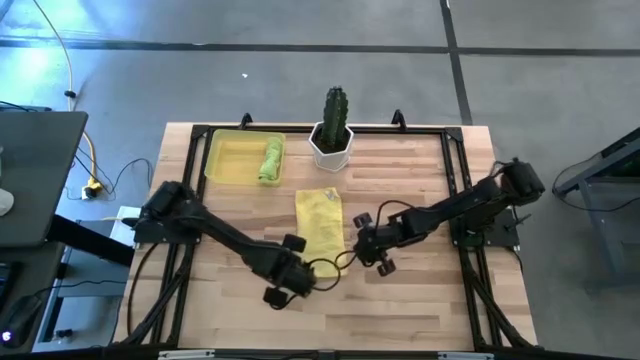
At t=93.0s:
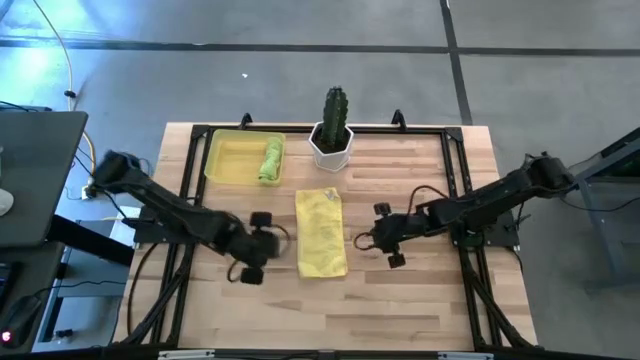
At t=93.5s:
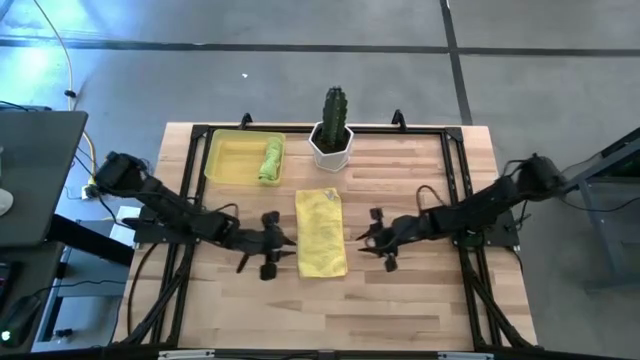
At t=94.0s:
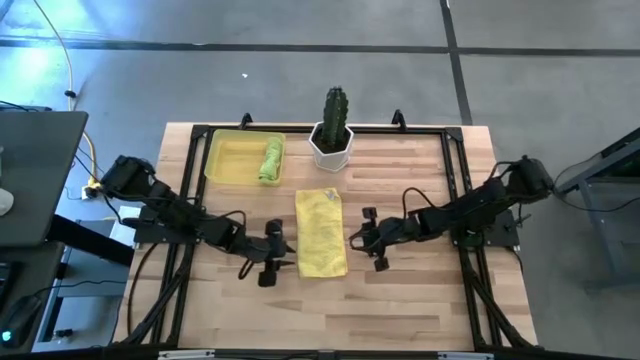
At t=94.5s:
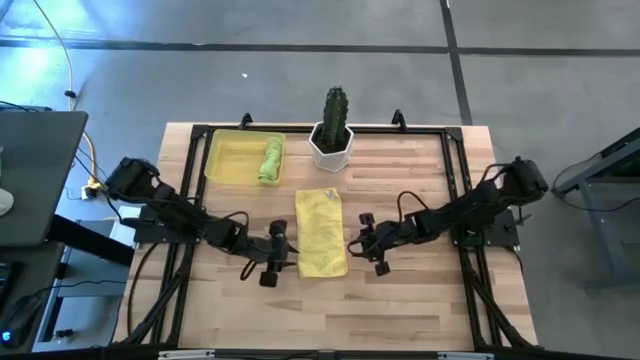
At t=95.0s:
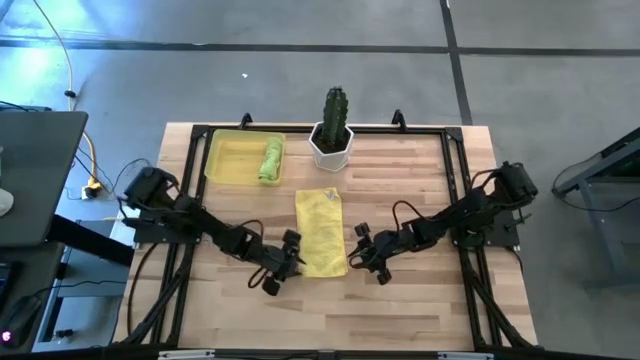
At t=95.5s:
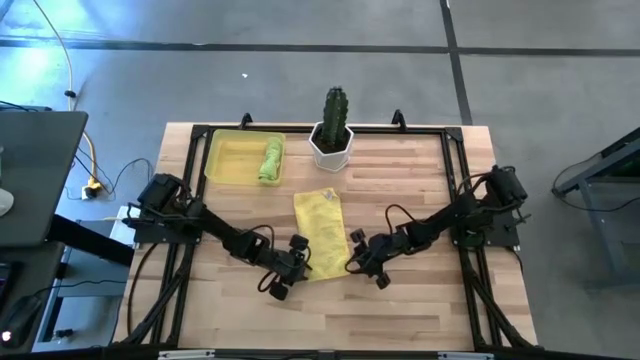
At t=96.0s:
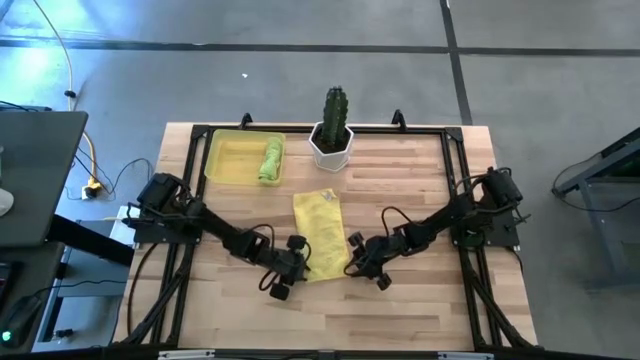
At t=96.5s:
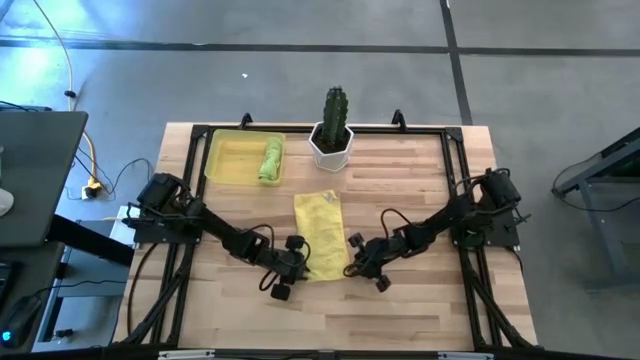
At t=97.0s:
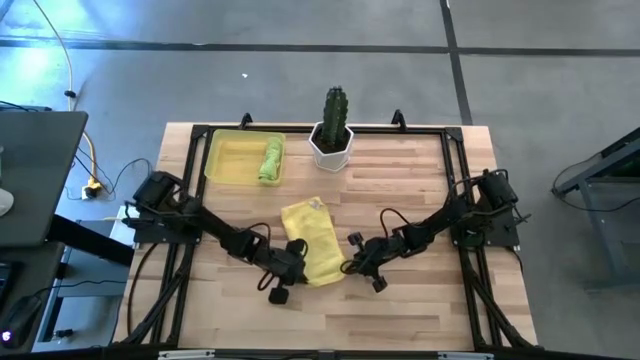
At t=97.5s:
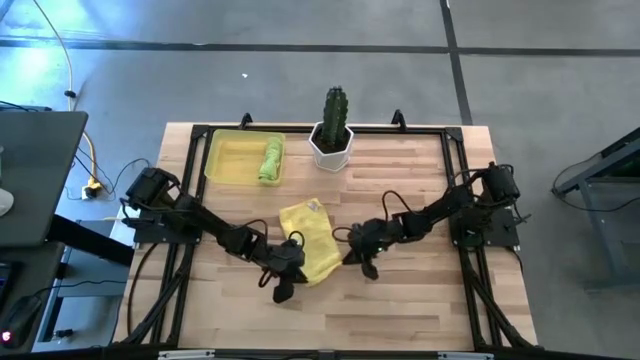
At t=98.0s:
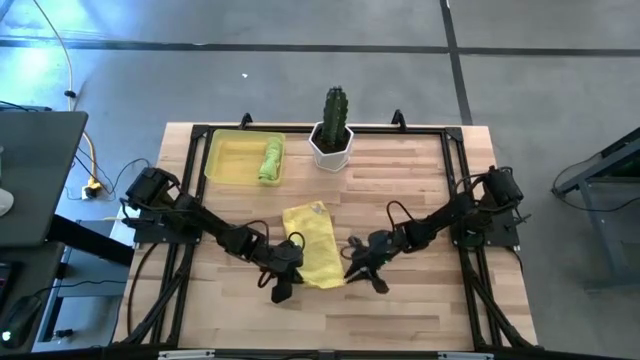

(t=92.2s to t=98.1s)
Task: Roll microfiber towels into tight, uniform cylinder then place into a basket
Roll the yellow microfiber towel

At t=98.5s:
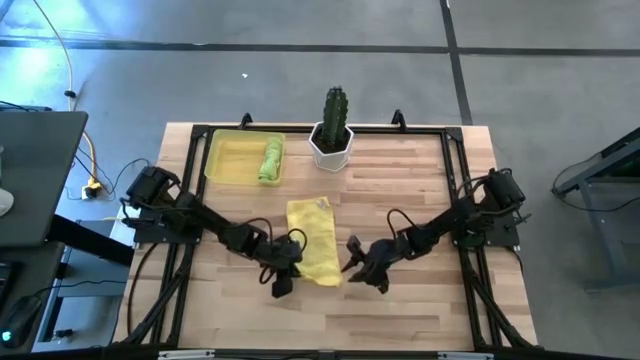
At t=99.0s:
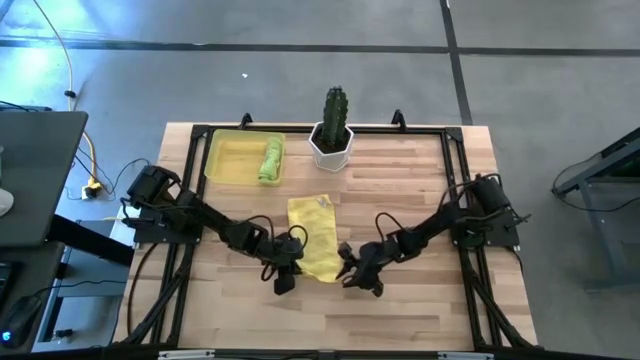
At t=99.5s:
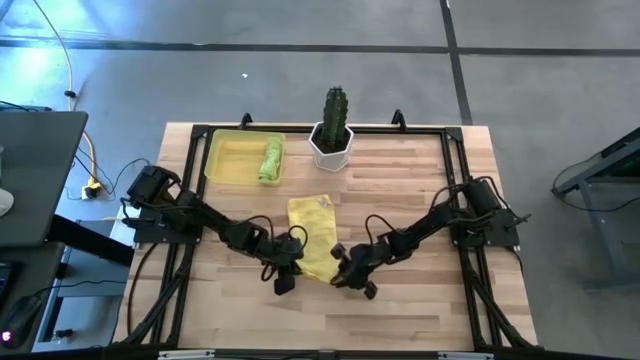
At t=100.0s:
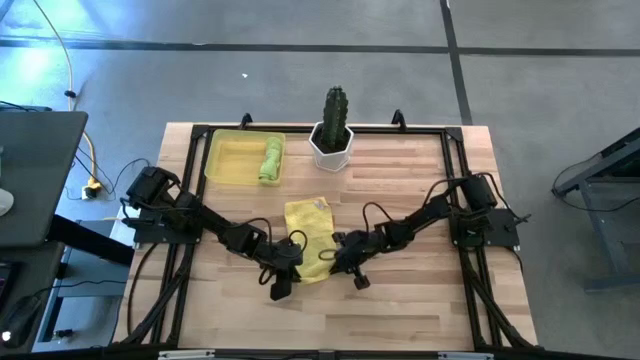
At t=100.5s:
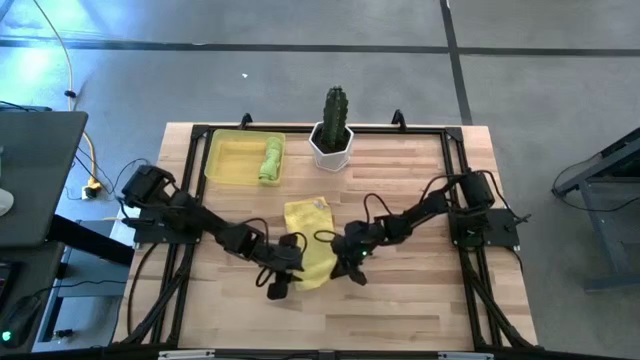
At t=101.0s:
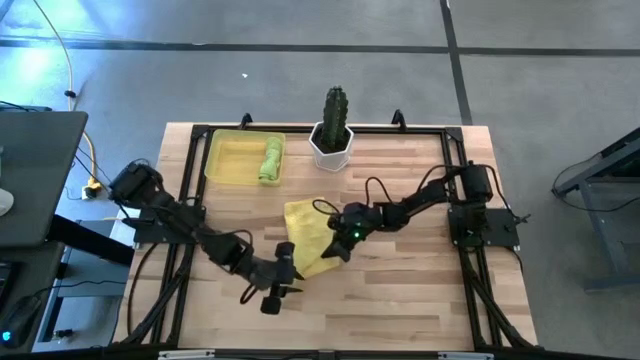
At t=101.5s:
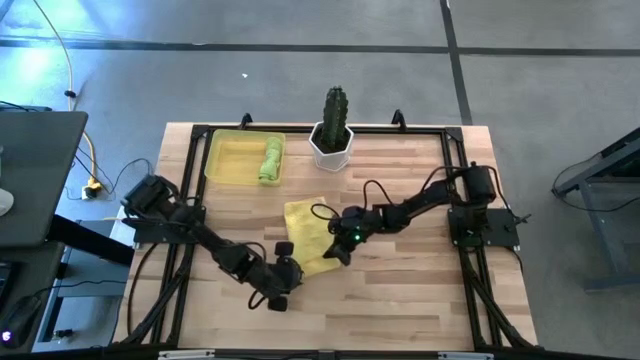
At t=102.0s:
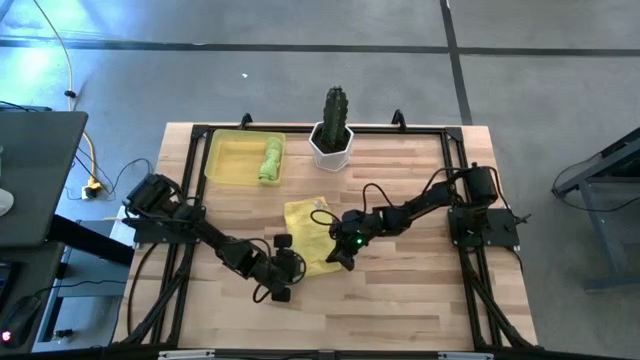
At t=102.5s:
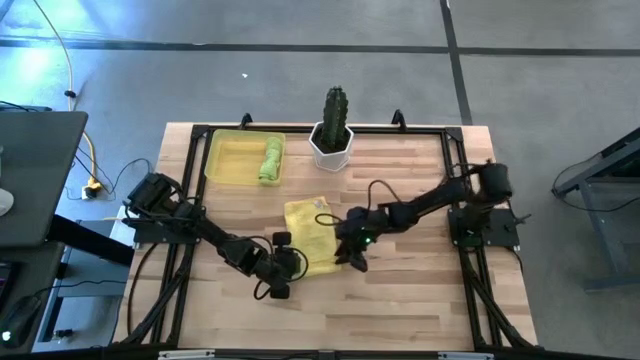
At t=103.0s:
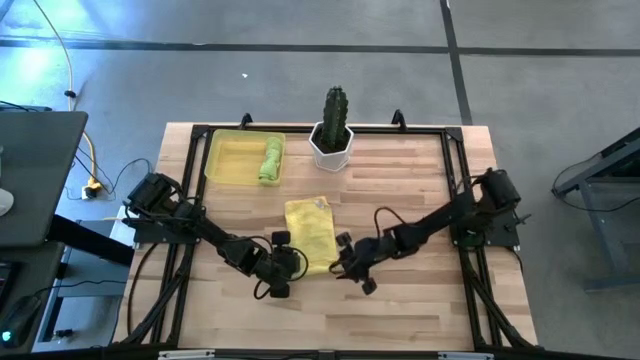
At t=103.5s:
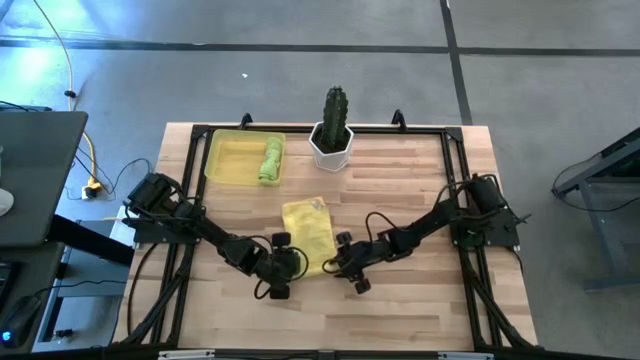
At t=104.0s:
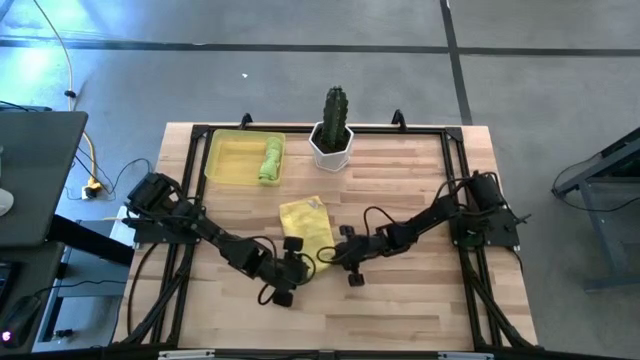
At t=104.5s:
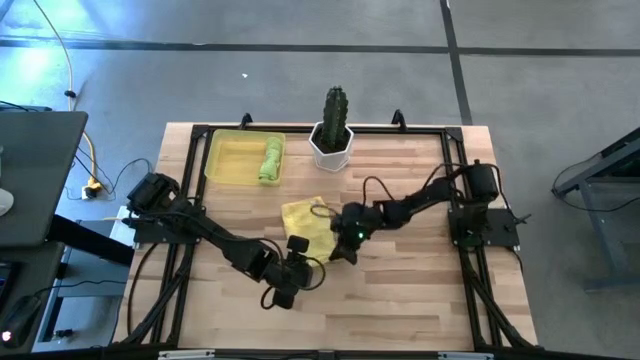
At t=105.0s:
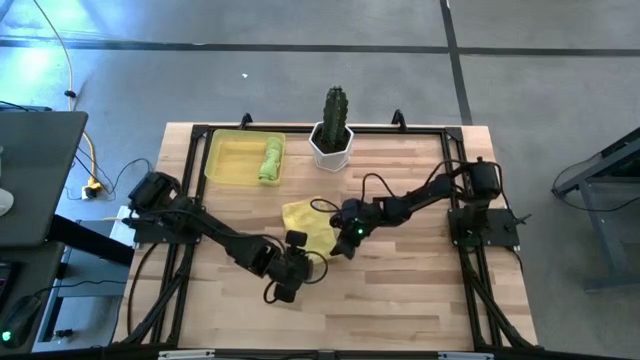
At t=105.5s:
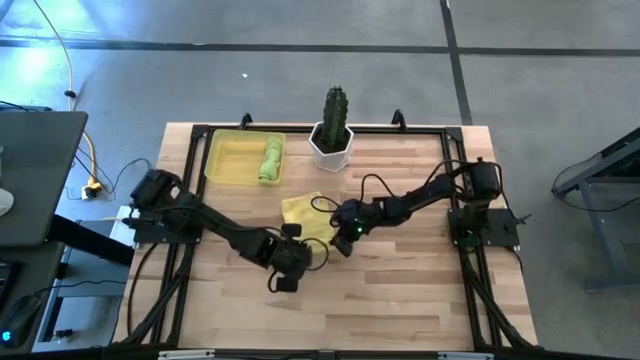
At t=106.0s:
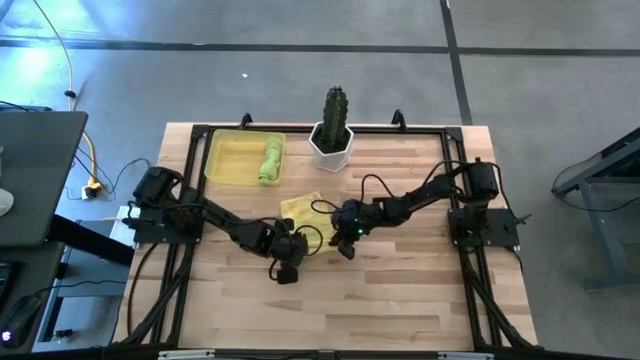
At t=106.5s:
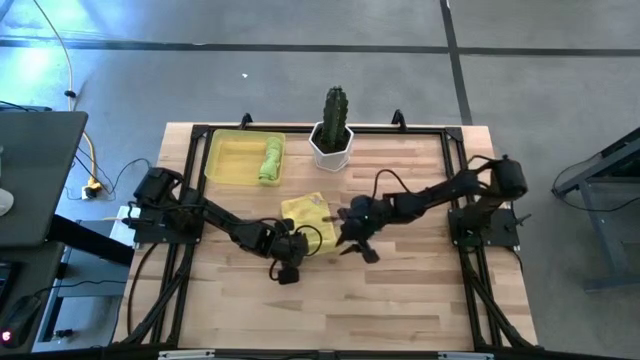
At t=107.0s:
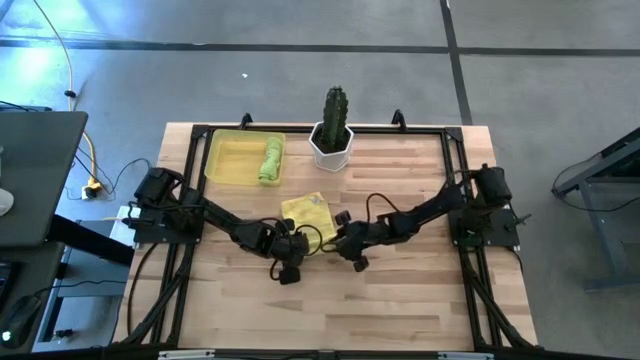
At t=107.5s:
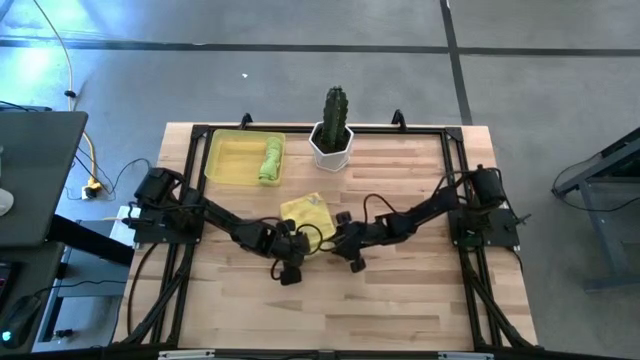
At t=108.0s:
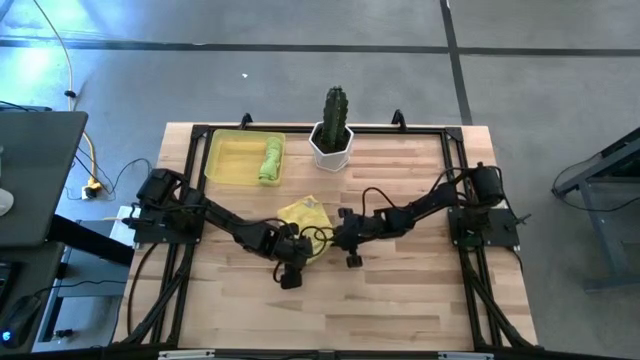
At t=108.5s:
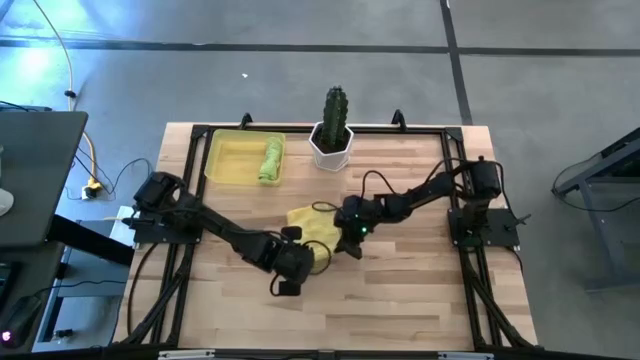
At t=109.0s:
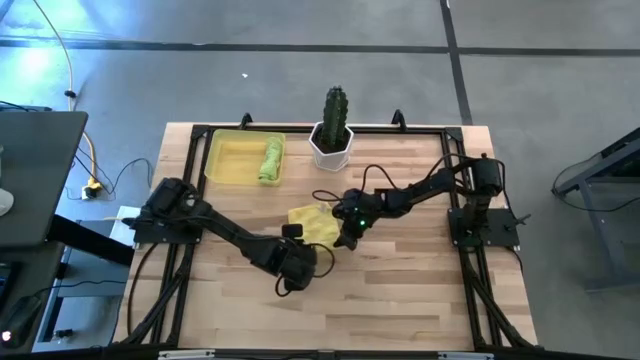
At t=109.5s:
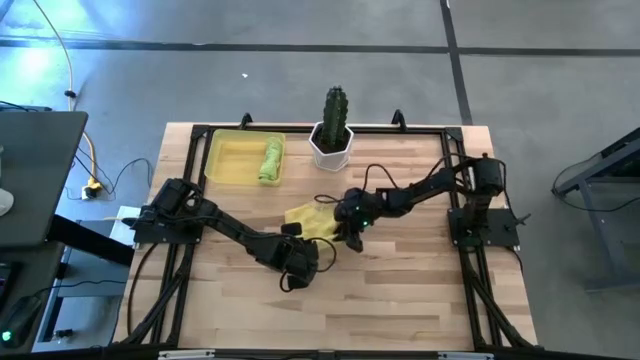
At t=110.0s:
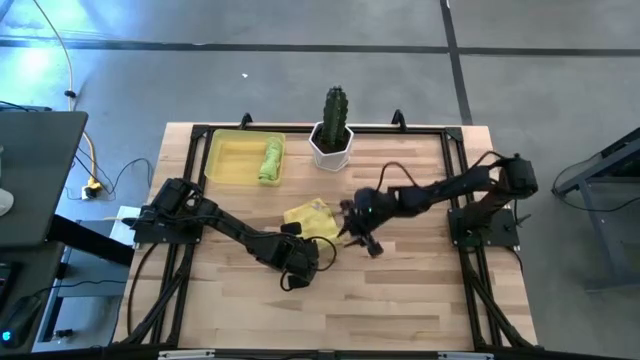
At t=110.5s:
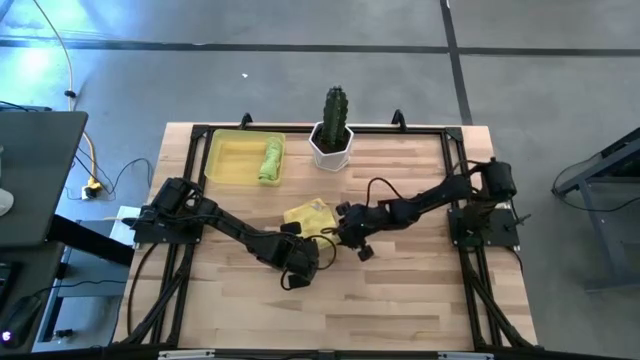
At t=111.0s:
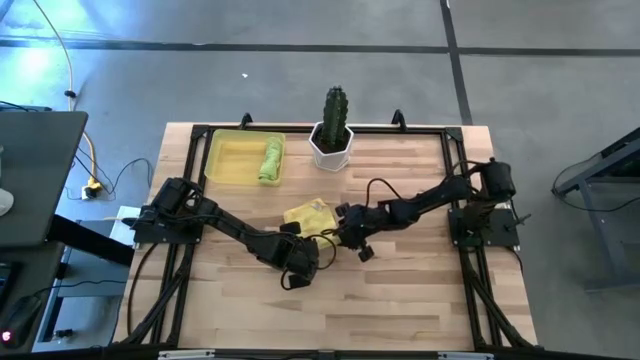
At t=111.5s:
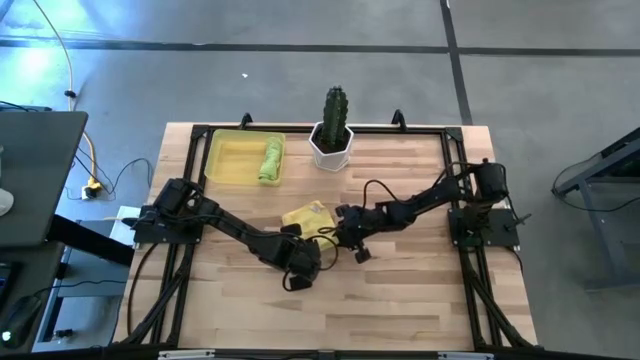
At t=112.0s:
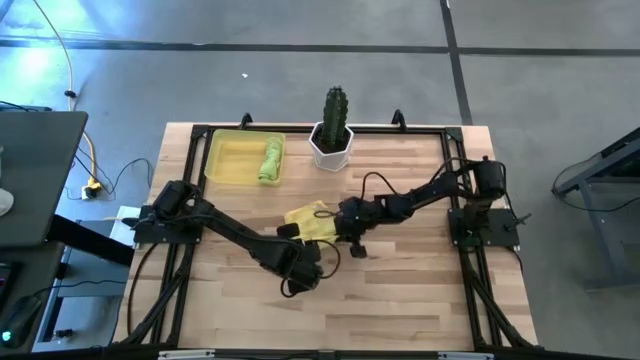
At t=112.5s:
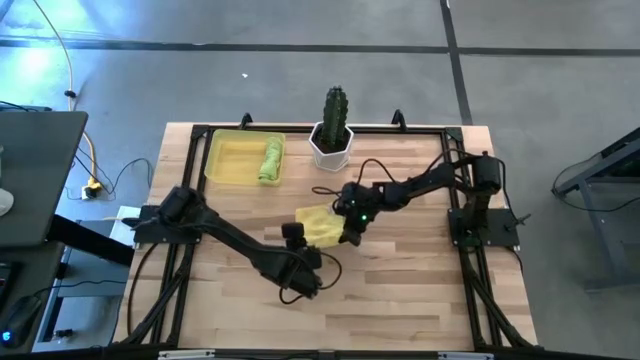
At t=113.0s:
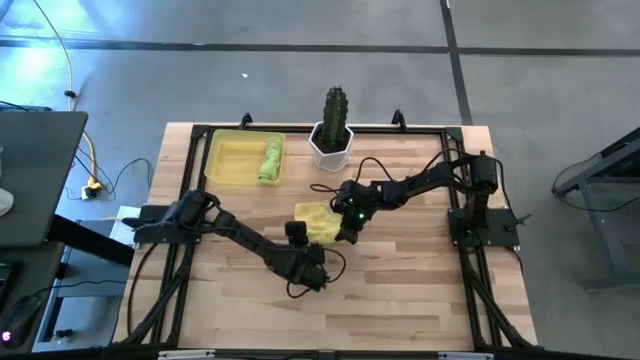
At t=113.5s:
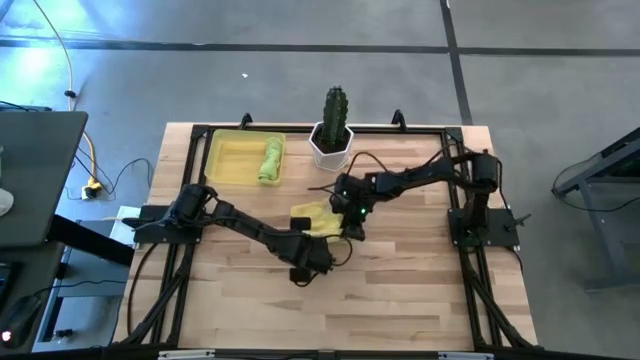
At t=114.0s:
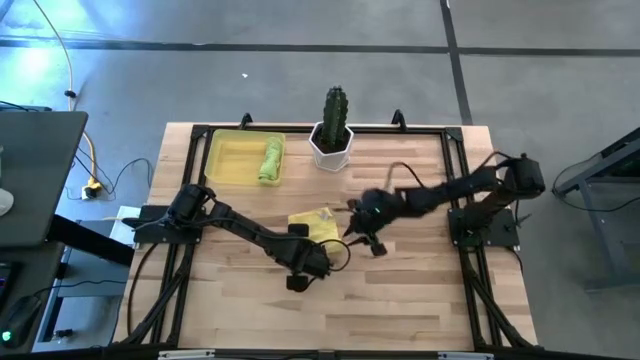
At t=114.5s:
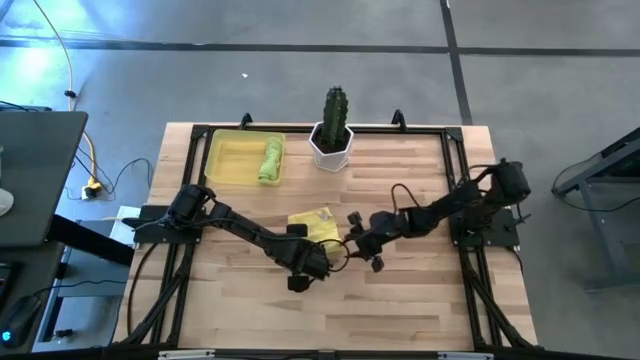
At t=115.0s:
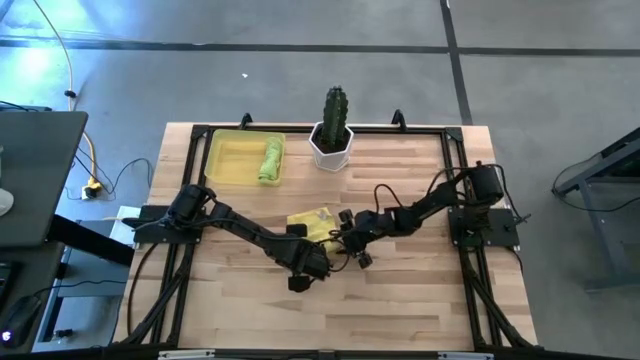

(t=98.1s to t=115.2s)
Roll the yellow microfiber towel
